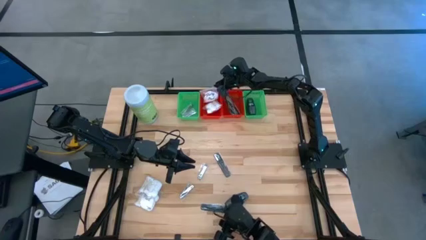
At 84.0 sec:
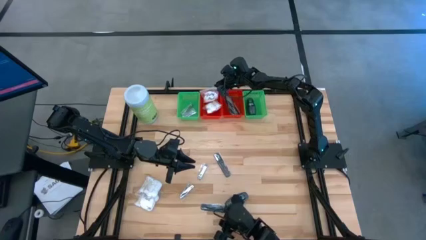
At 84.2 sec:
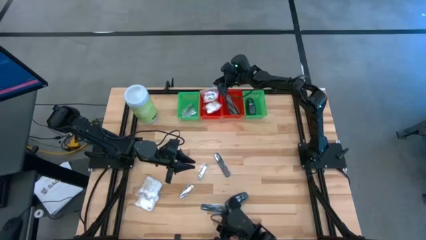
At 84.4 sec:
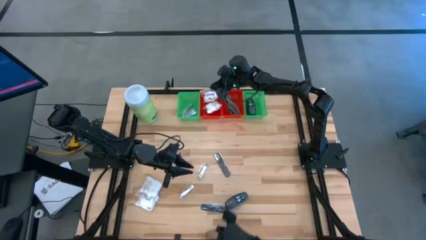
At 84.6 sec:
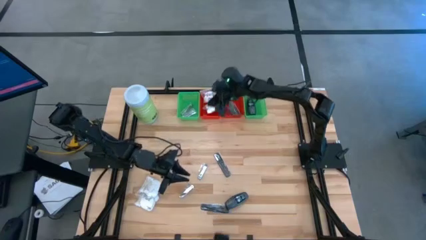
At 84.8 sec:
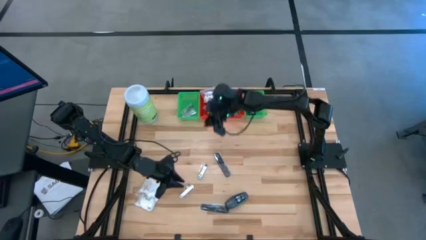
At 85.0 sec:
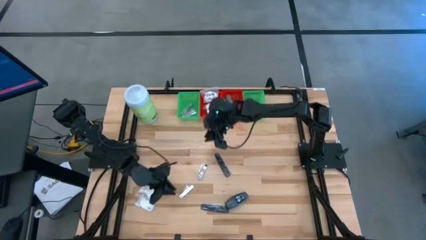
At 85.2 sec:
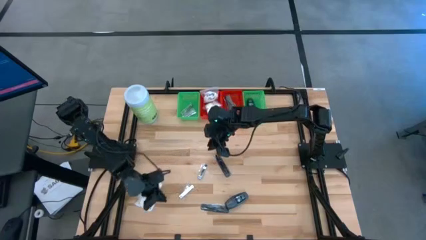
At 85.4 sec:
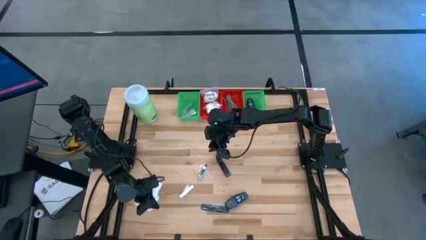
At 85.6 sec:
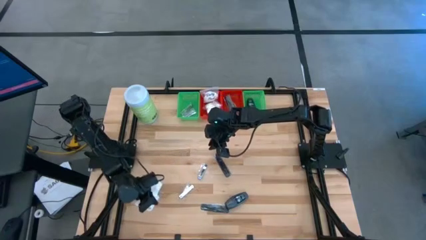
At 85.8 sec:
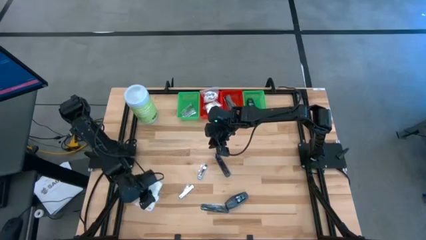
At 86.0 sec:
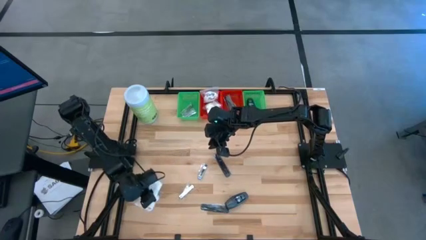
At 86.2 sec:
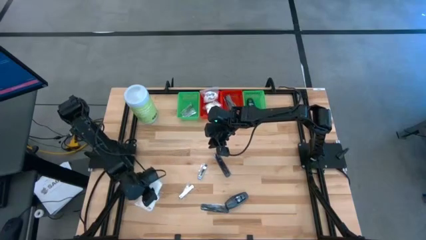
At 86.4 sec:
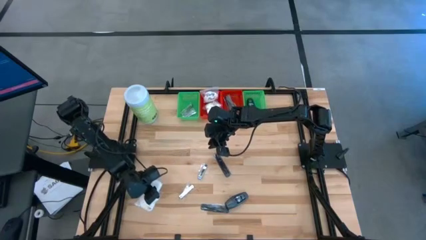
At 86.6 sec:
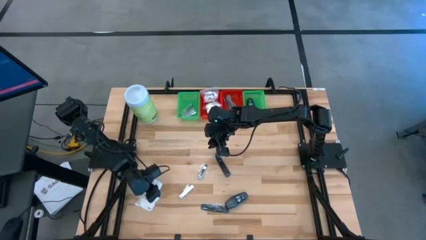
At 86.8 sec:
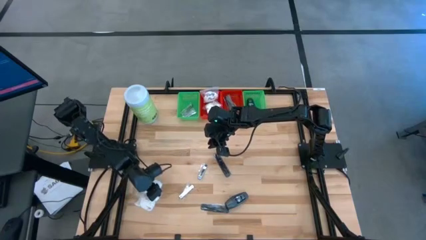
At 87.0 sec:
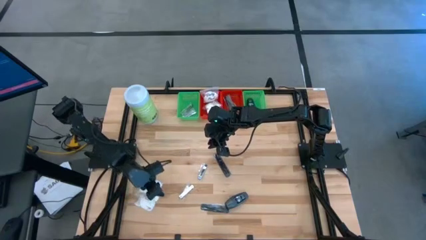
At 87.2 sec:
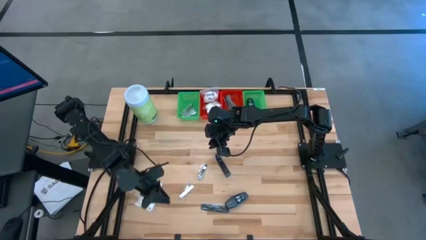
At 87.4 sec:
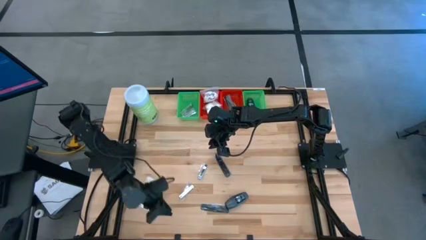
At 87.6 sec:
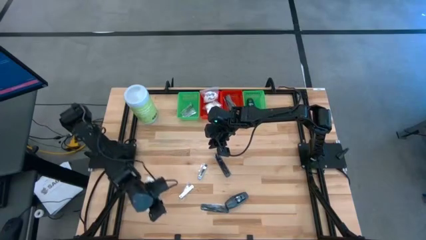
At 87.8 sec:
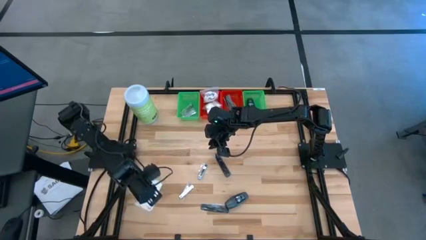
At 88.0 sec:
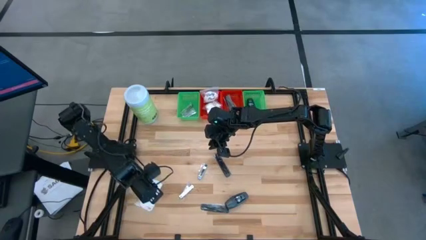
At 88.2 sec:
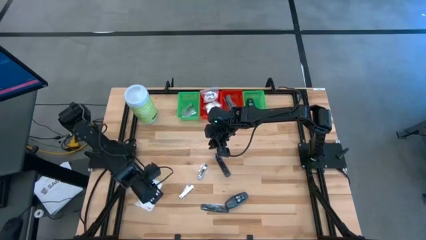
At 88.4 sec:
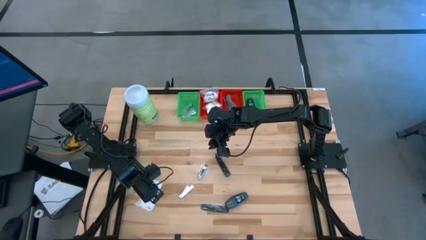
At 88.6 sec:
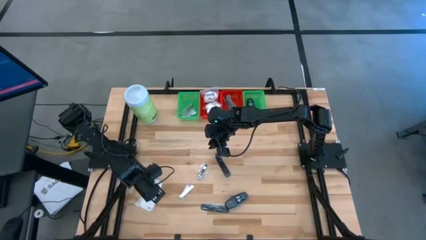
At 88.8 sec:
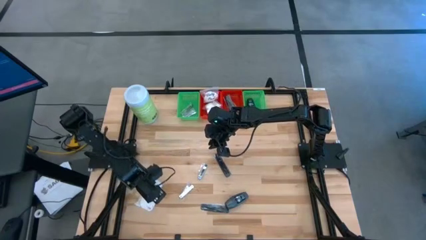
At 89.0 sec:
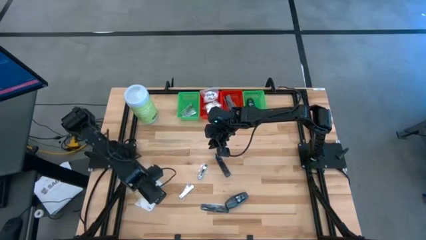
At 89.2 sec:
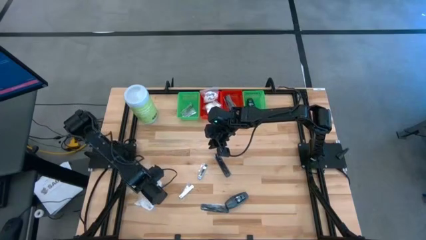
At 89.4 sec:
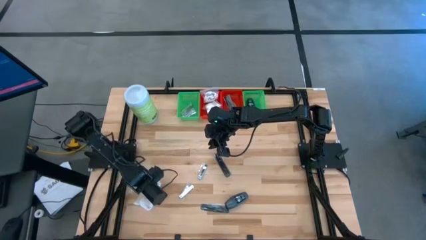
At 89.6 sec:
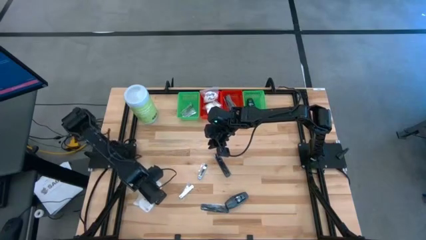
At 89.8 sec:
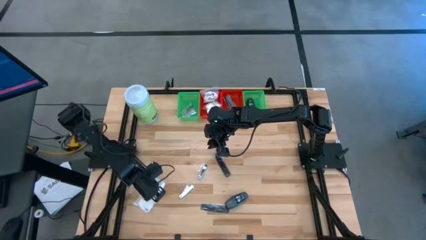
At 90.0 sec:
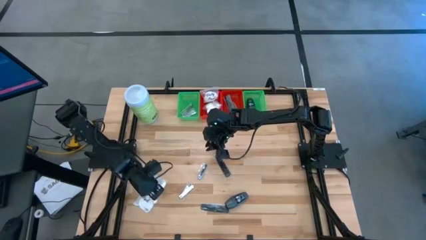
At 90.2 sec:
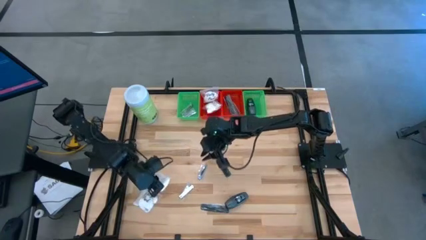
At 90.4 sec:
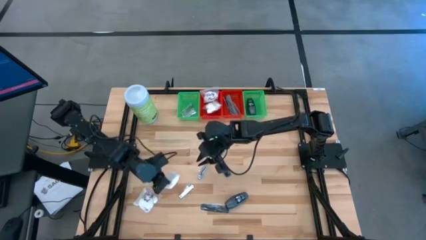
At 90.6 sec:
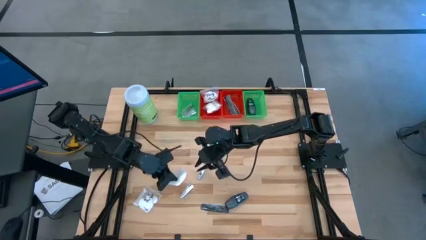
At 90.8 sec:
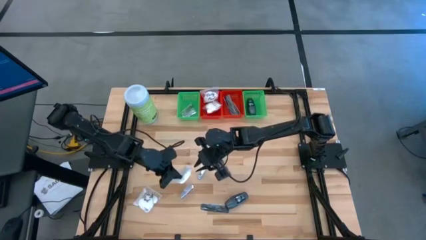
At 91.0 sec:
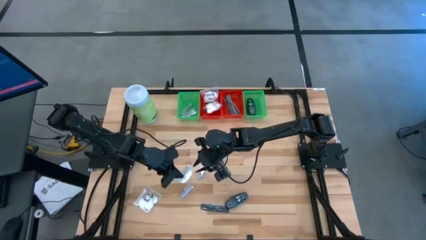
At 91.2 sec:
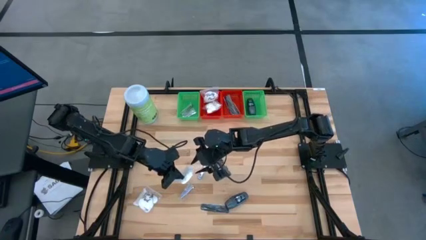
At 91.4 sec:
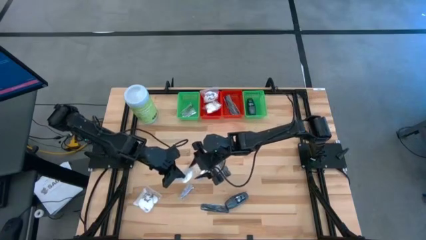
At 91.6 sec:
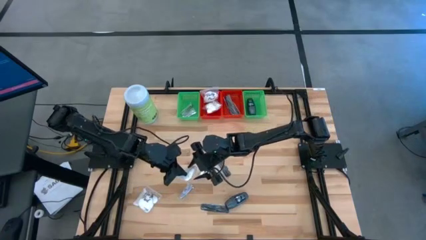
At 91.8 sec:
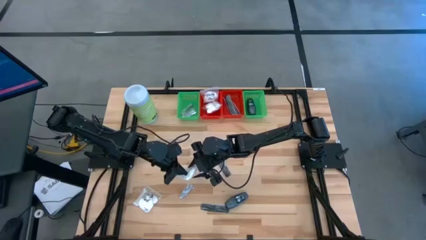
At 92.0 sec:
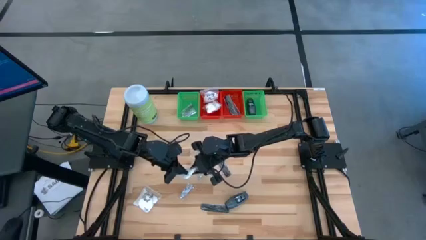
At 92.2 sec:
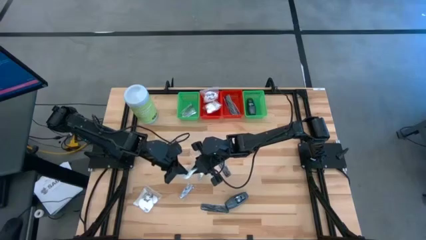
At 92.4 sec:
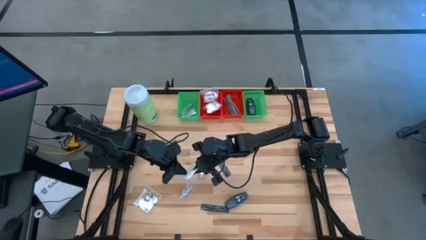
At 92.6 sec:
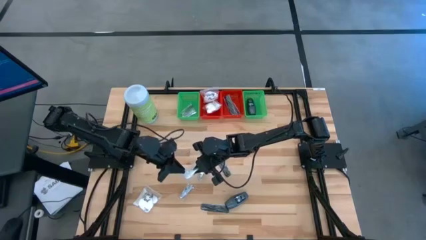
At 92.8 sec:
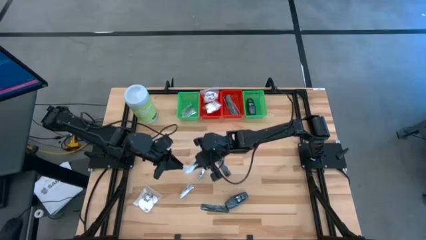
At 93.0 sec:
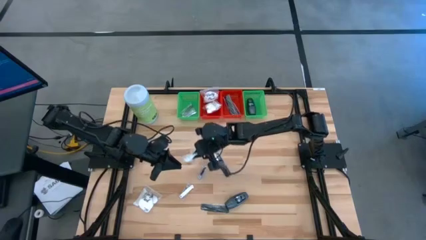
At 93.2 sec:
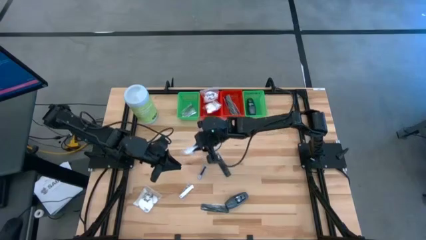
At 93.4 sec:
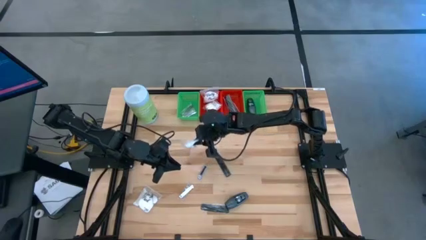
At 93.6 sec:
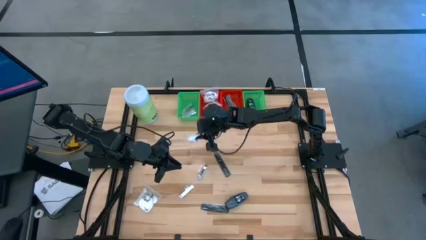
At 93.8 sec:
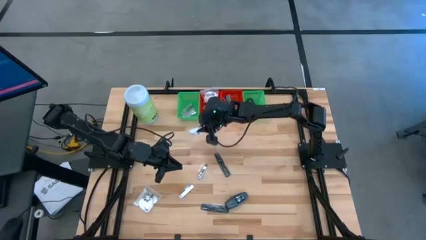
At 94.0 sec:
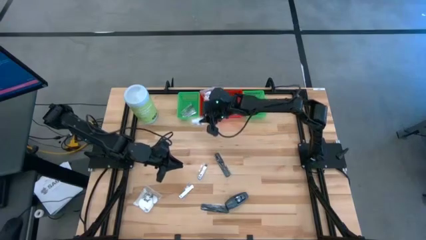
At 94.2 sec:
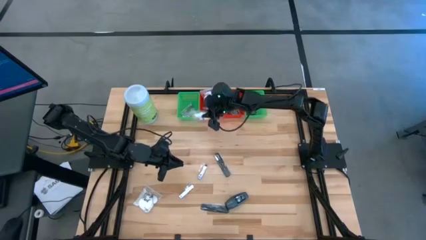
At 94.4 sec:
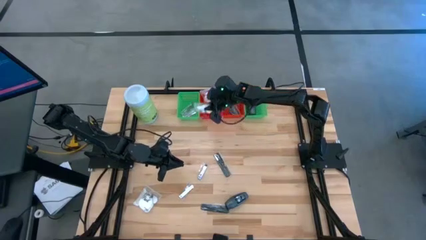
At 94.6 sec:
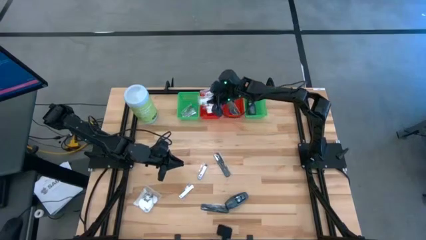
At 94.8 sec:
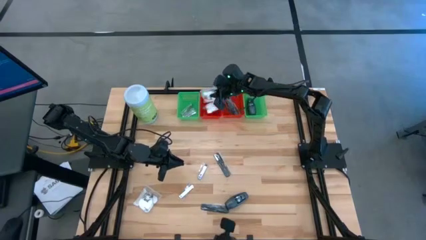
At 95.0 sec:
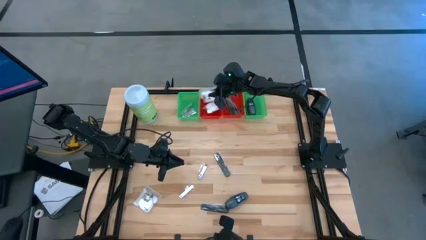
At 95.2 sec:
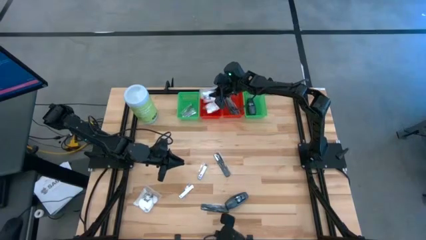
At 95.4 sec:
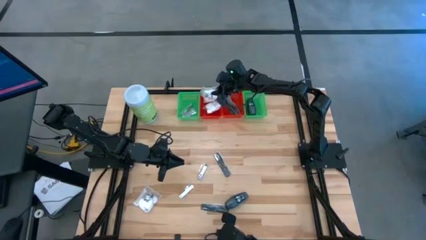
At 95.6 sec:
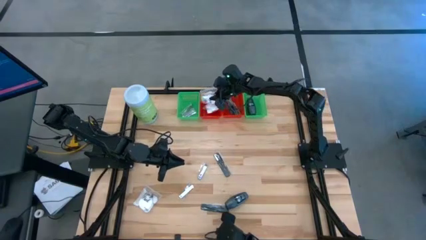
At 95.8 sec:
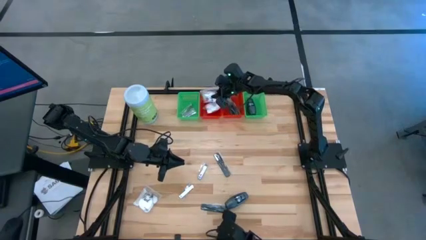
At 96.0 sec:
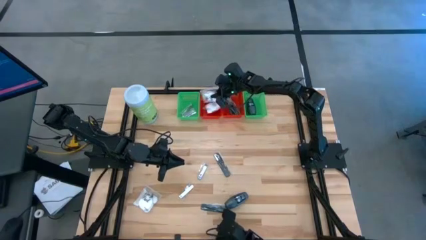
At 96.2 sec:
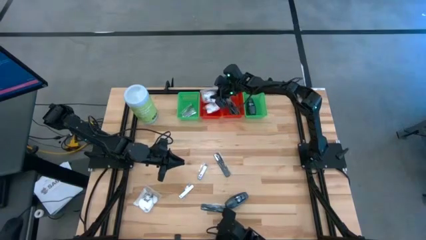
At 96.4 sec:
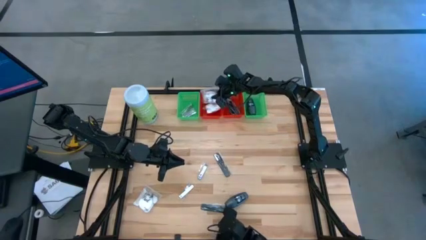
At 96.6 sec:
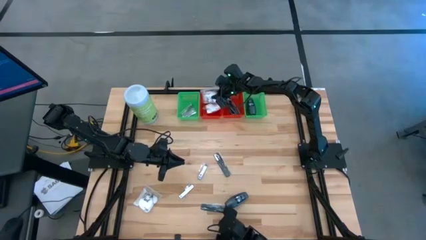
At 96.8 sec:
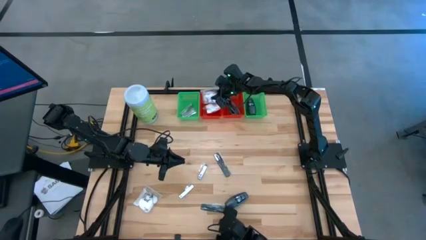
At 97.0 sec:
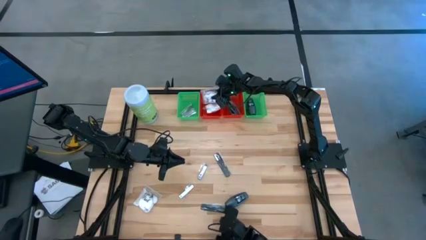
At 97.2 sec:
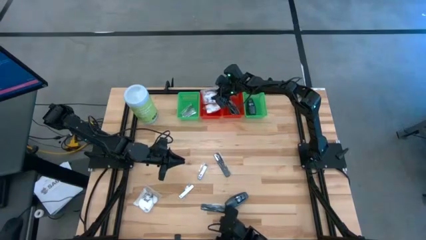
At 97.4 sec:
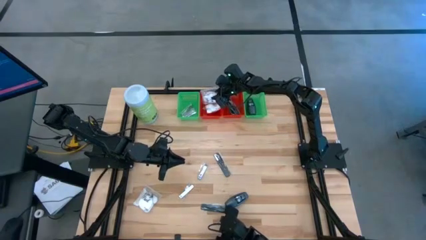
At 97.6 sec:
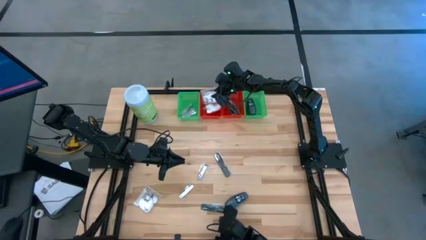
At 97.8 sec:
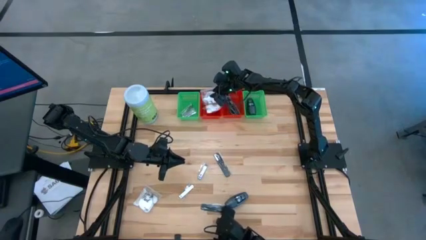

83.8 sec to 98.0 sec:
Task: Pick & Place Travel size toiletries
Put the white cotton pack into the left red bin
